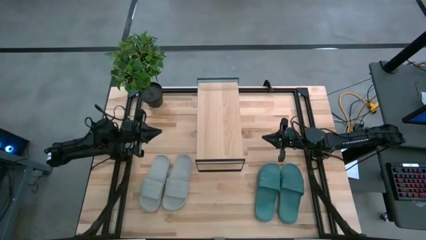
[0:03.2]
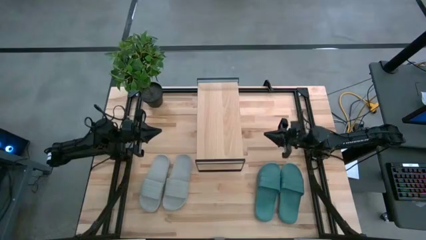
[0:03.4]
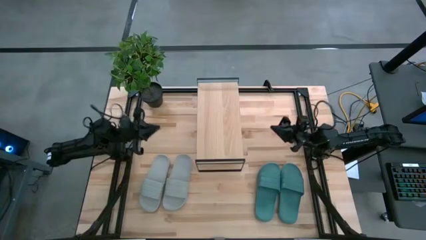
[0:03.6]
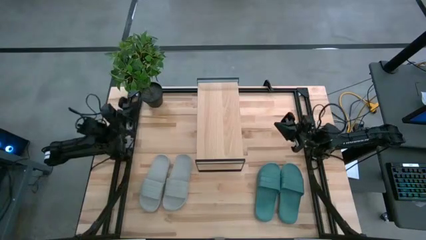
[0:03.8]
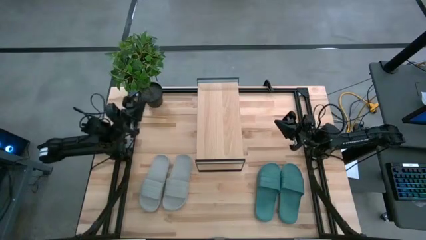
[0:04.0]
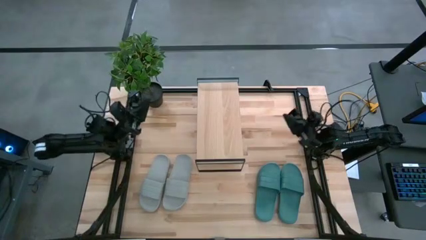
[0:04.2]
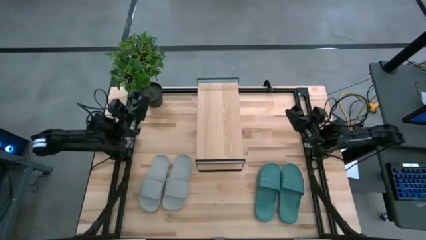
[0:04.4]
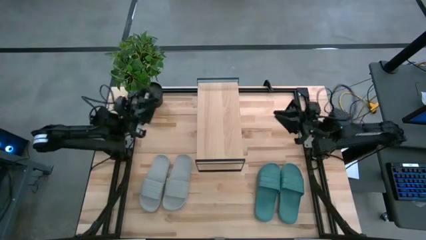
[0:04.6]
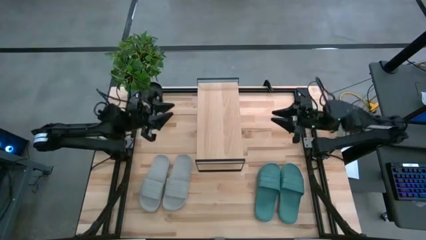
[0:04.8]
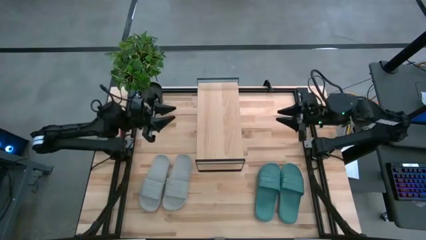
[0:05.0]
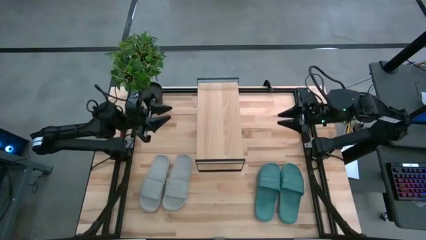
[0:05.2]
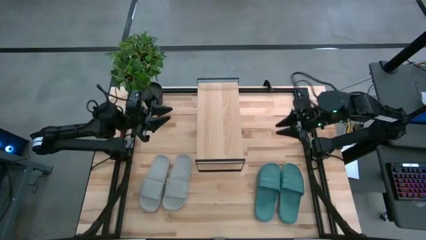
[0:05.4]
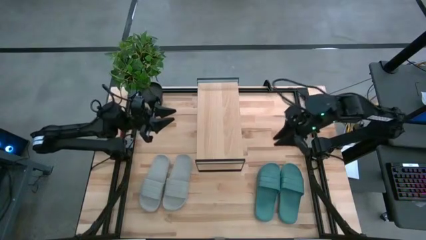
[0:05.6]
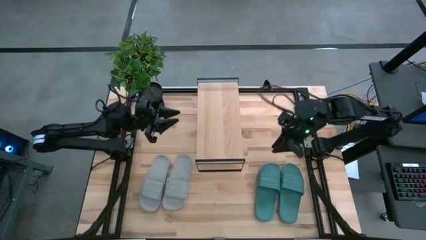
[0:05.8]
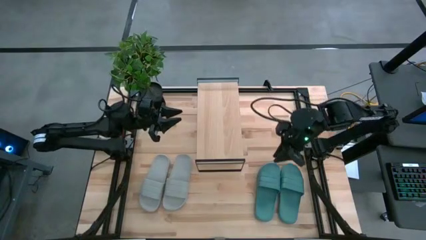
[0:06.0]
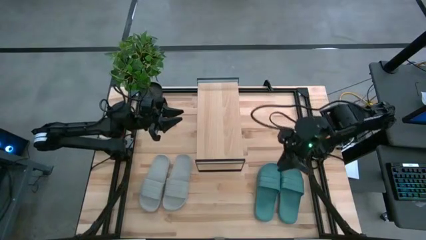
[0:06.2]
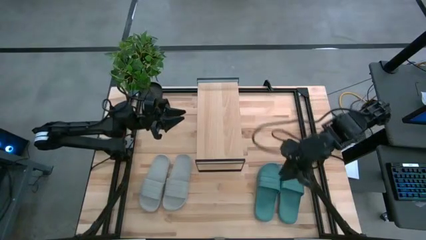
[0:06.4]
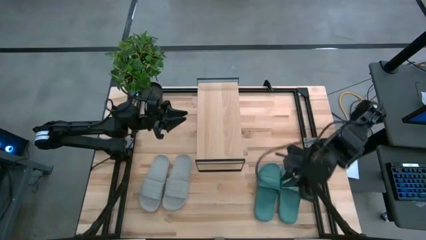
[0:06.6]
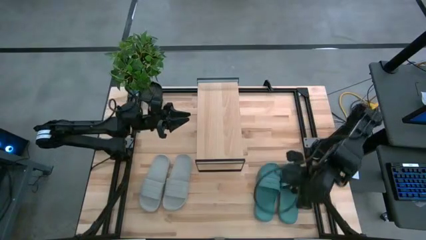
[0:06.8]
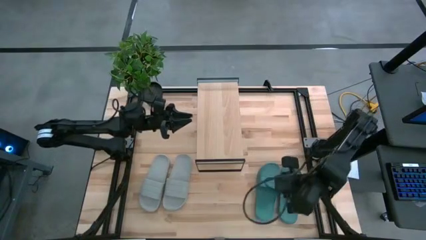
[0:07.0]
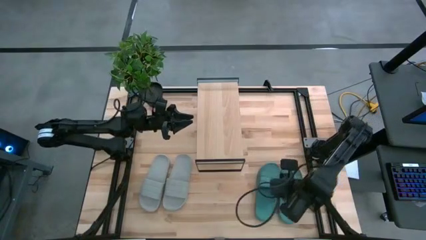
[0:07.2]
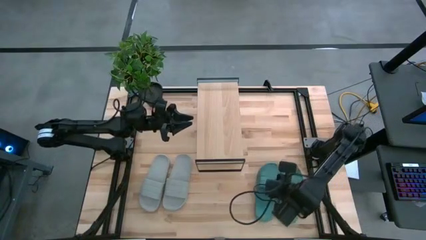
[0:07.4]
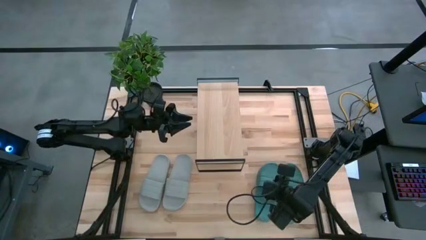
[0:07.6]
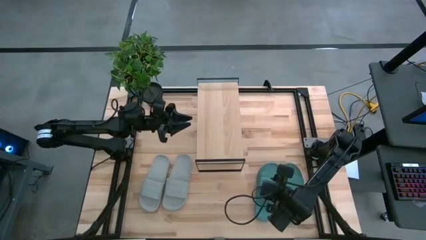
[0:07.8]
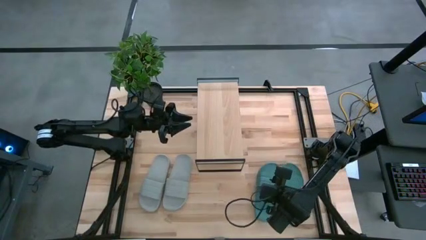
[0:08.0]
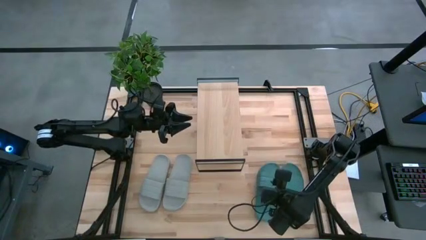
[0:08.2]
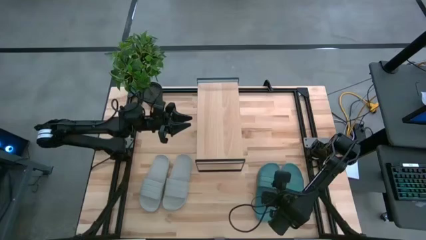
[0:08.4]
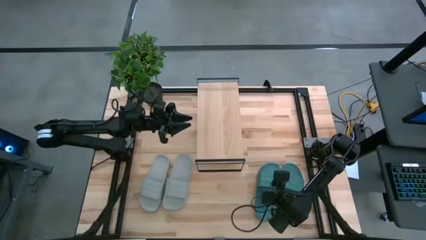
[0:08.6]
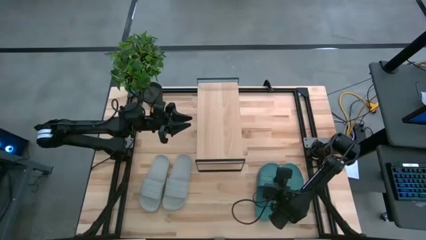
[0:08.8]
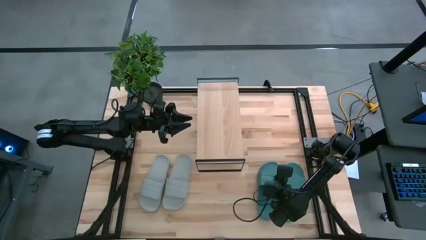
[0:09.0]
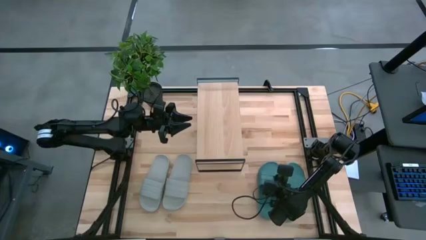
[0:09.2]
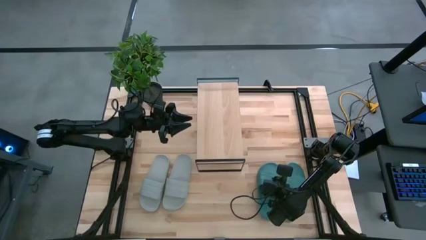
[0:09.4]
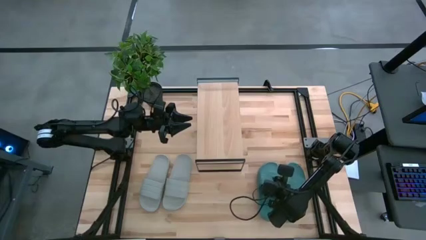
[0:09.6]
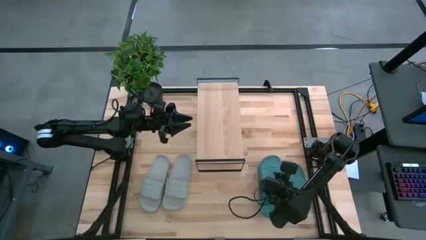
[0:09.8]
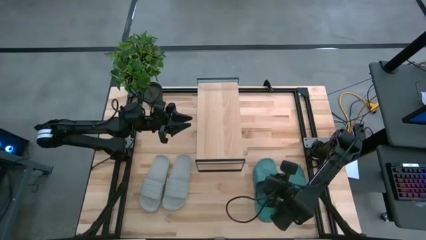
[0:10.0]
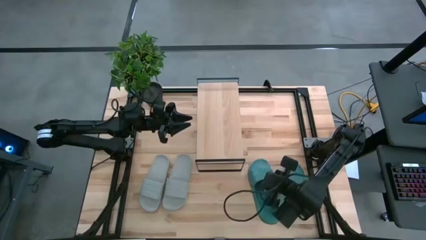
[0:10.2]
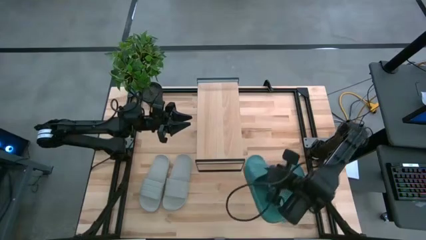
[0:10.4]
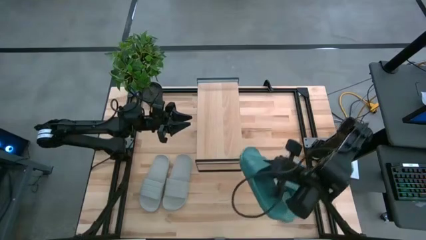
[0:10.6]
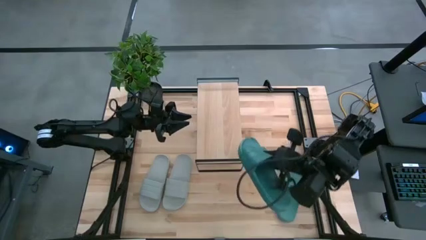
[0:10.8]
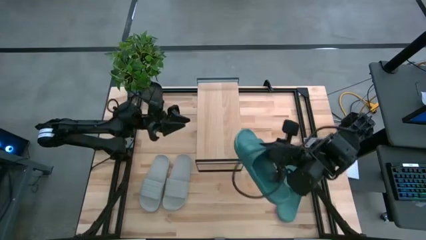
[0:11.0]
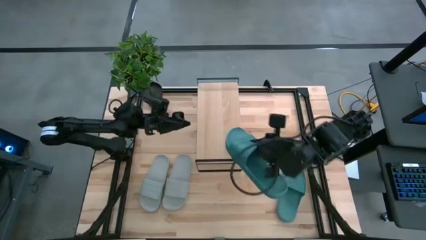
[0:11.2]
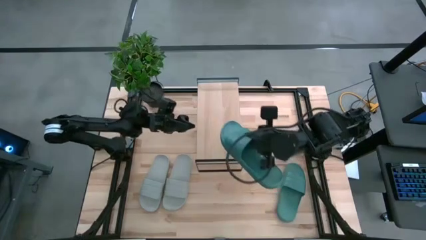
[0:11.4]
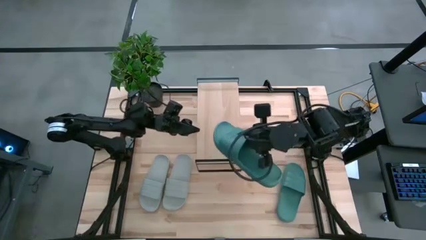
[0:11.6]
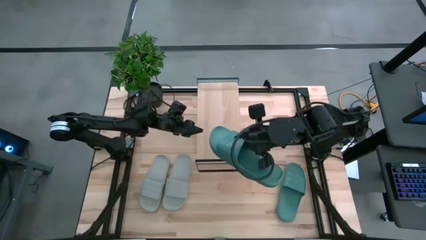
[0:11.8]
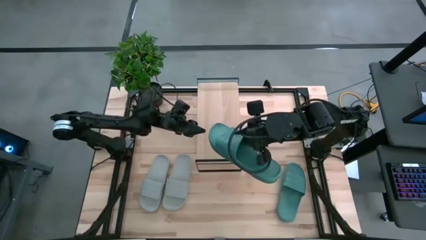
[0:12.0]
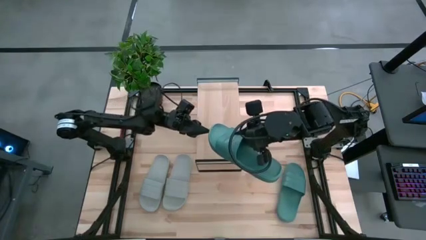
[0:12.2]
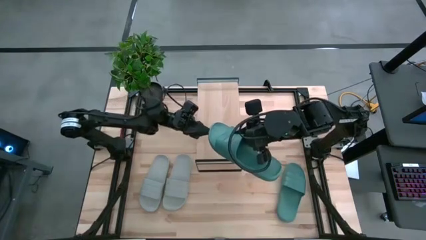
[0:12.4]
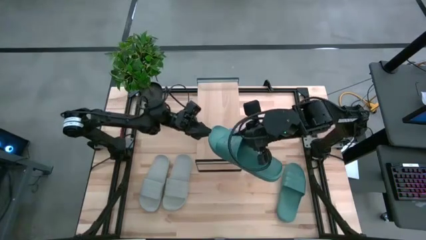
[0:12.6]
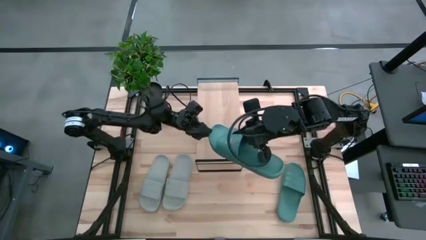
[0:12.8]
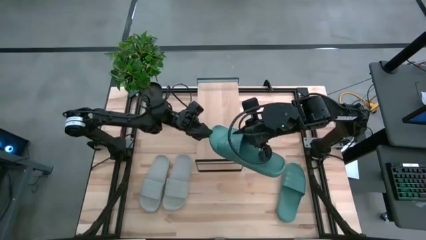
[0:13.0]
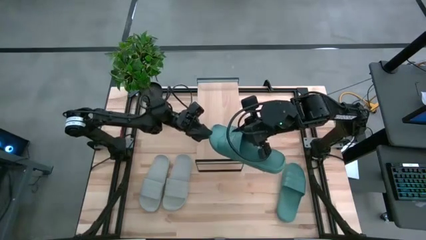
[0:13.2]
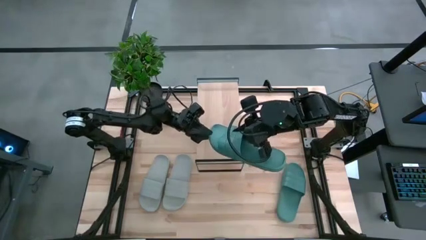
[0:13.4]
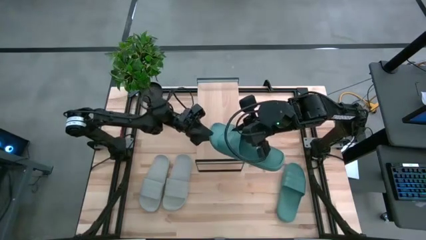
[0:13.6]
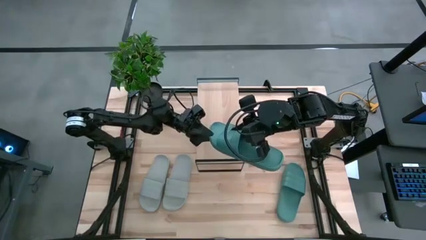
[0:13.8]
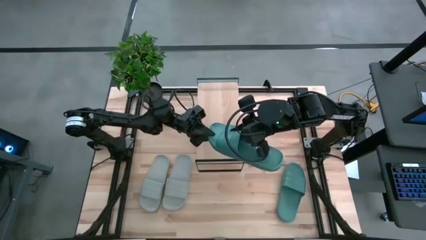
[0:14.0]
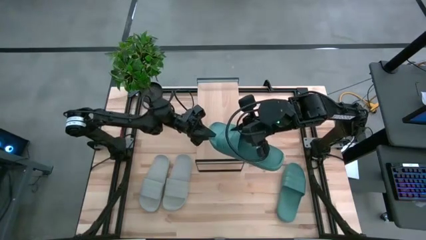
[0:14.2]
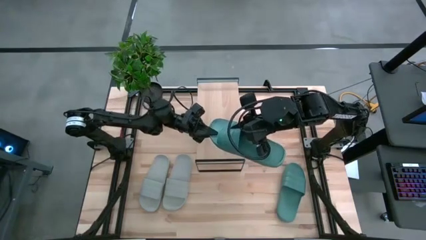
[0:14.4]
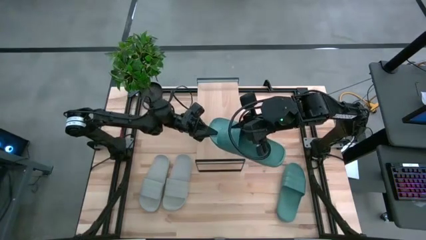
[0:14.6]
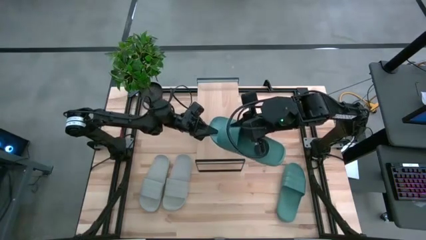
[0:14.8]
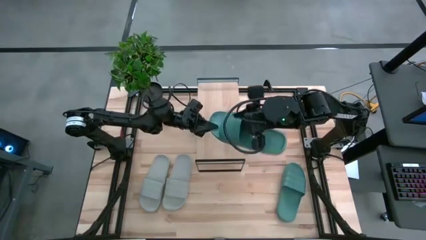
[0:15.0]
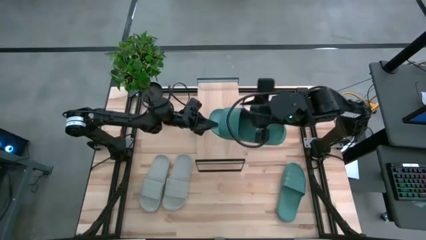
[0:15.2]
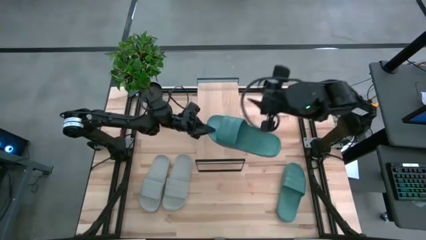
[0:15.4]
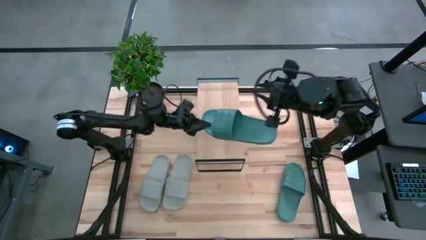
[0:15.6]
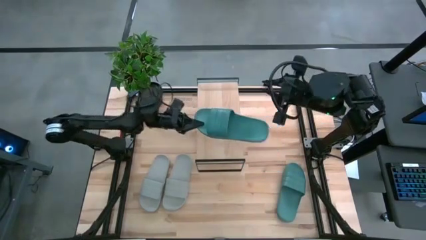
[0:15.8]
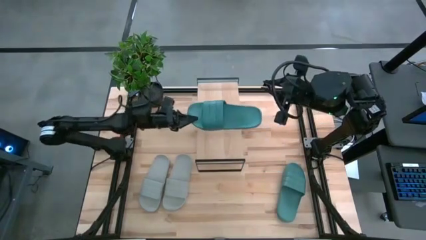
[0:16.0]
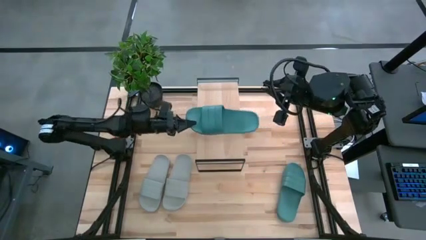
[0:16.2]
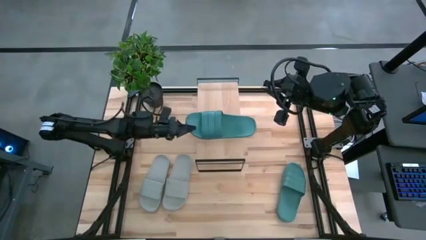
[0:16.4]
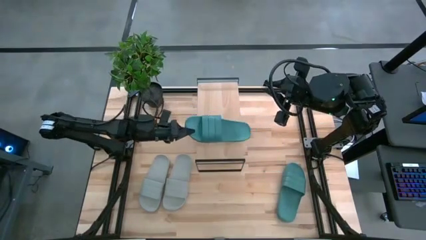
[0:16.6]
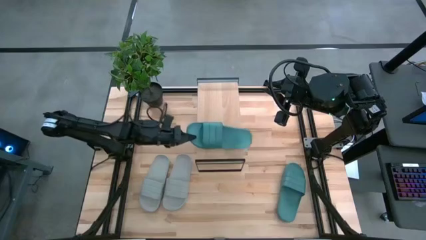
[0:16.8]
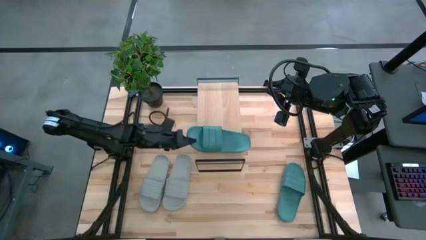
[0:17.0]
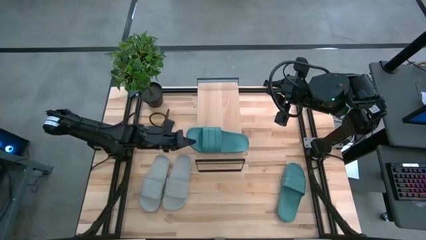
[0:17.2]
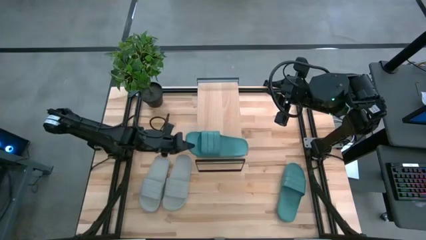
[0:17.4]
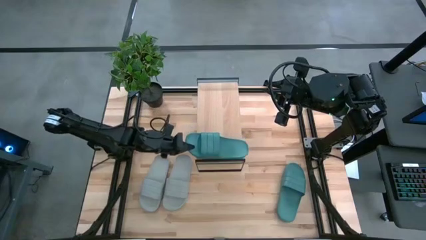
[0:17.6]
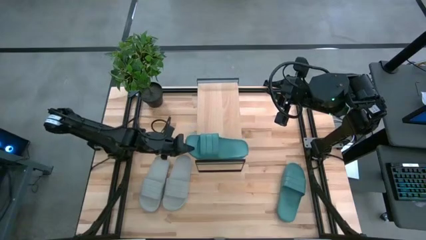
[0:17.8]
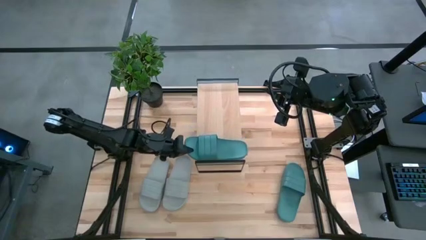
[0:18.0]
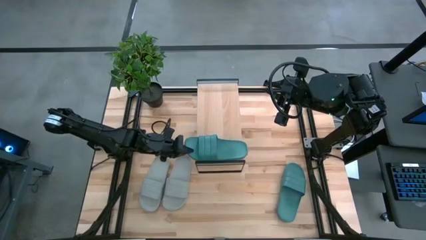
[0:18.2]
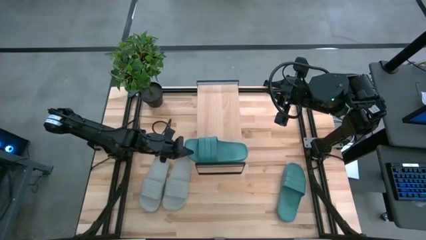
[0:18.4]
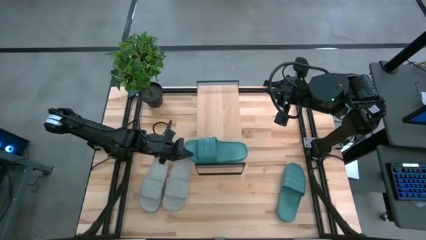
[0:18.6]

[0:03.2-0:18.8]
Task: Pick and place slides into the shelf
Put the left green slipper on the shelf
